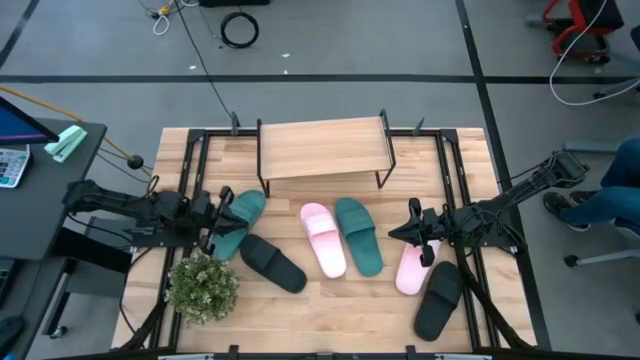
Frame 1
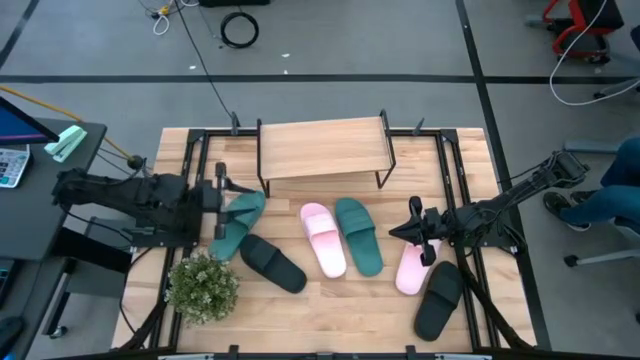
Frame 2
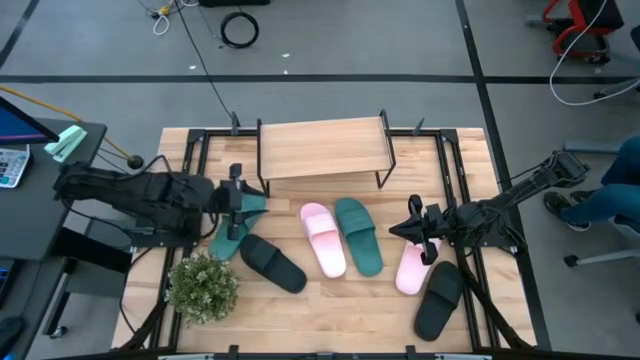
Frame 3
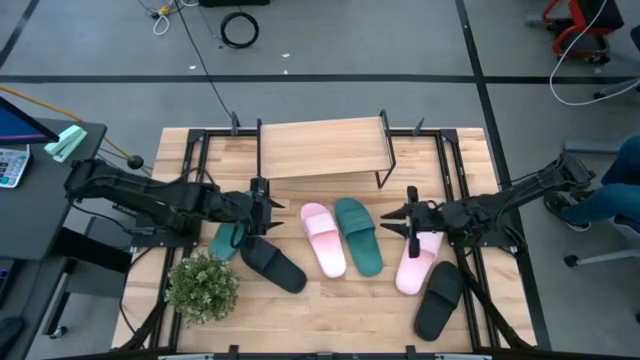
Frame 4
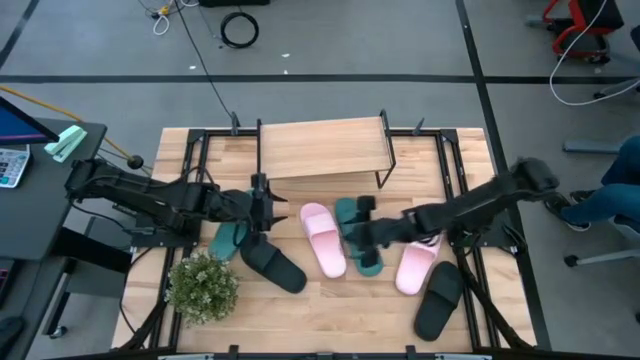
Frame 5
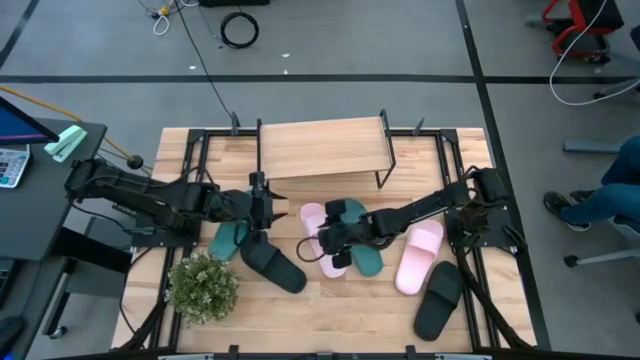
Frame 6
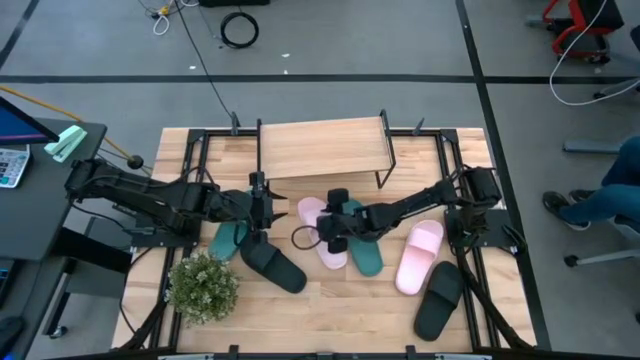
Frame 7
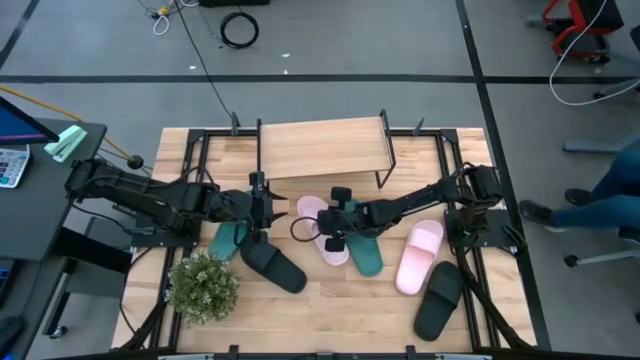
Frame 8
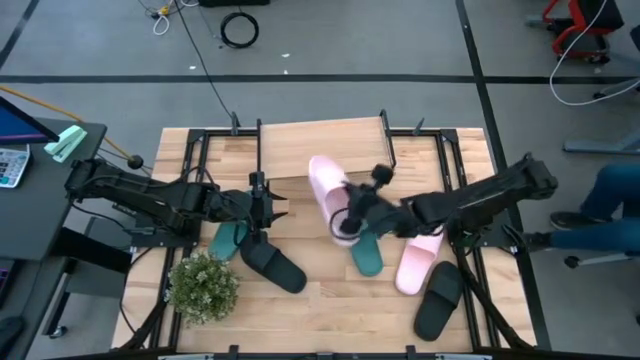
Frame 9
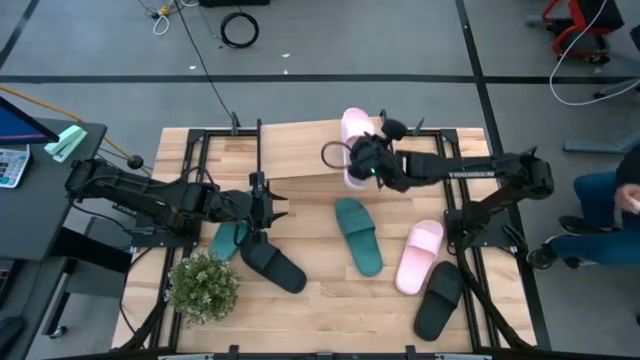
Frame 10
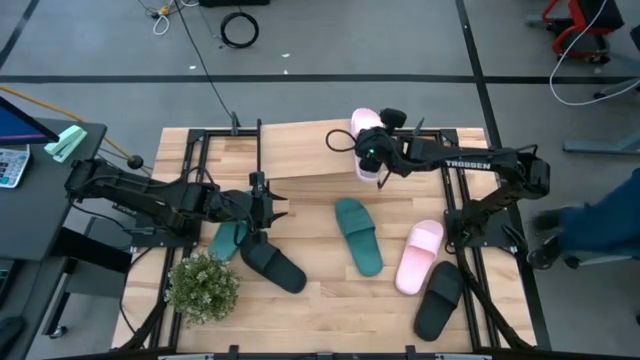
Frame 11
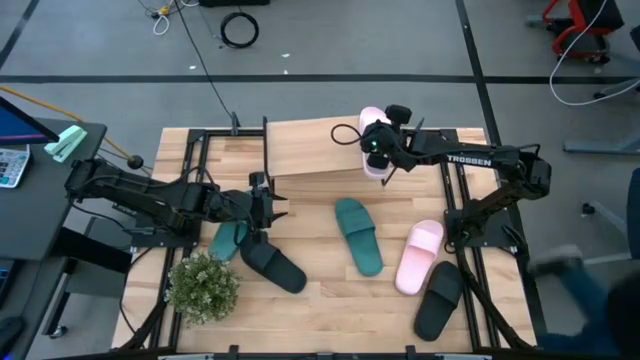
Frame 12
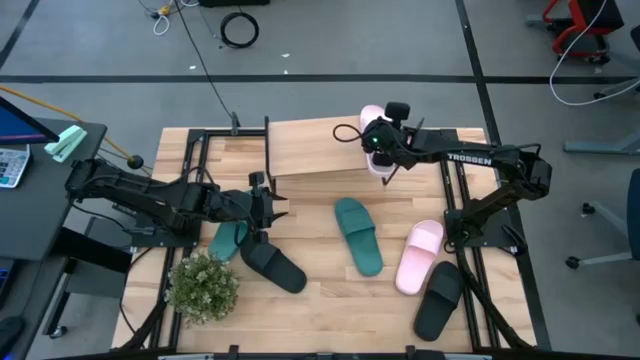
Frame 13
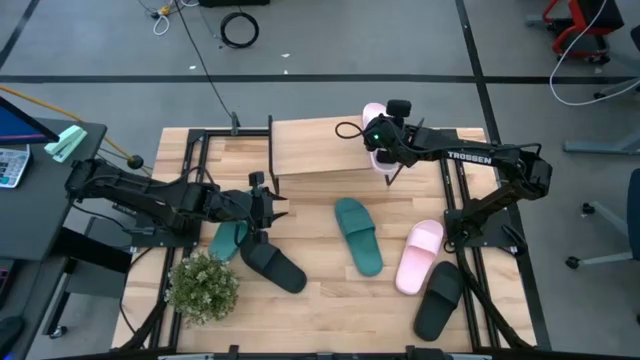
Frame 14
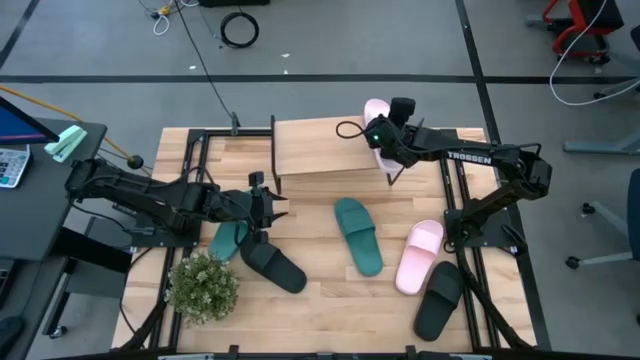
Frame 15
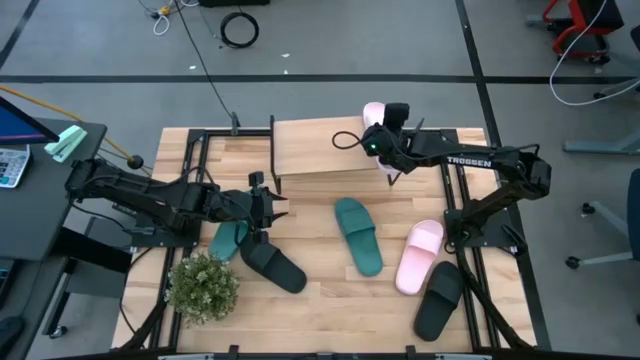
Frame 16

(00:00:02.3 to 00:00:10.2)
Task: Pick and place slides into the shelf
Put the left pink slipper on the shelf

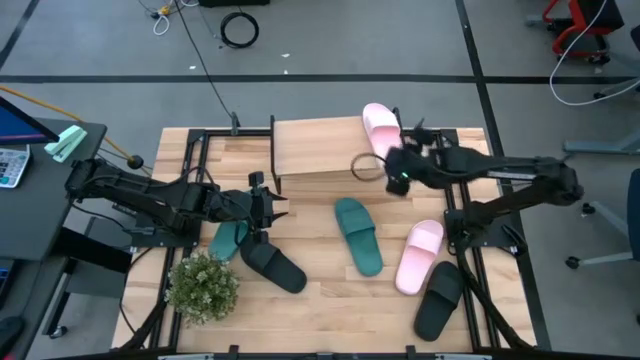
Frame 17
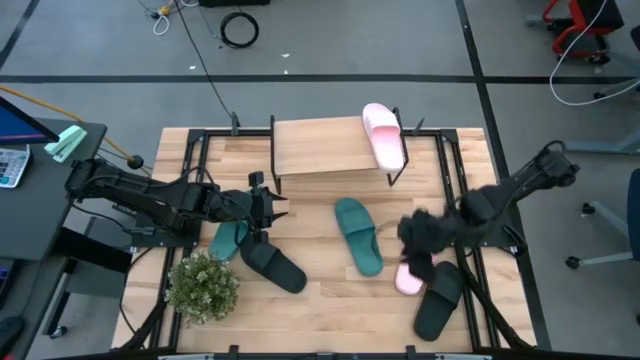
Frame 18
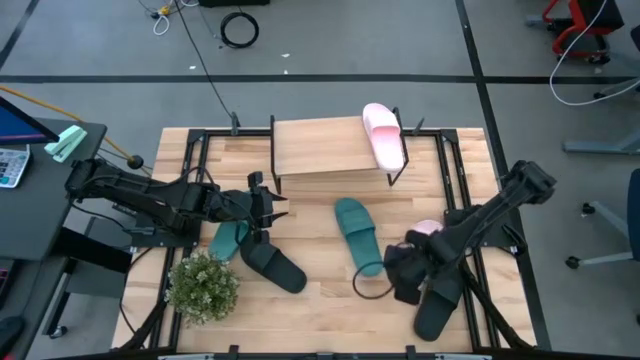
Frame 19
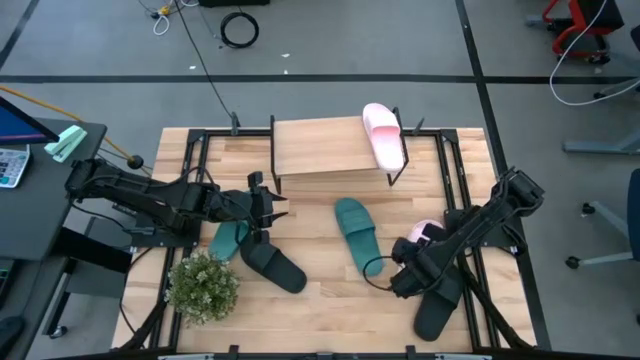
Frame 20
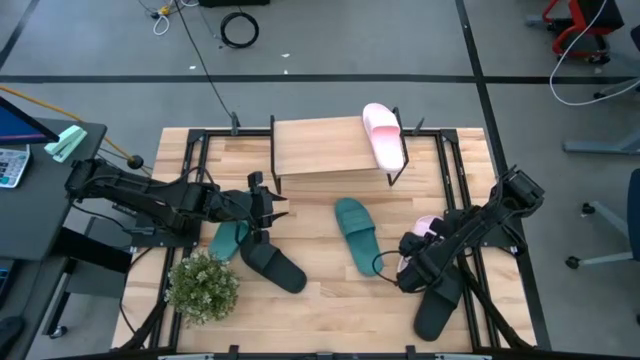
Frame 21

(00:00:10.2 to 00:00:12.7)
Put the pink slipper on the shelf

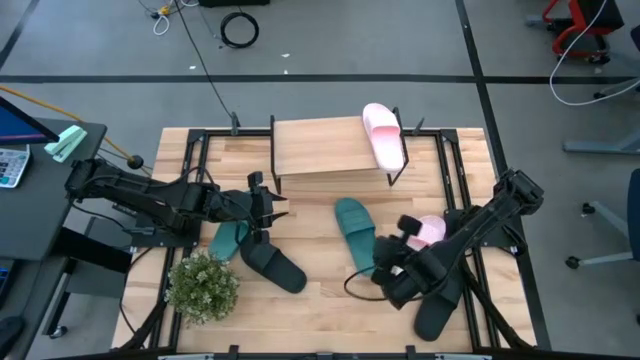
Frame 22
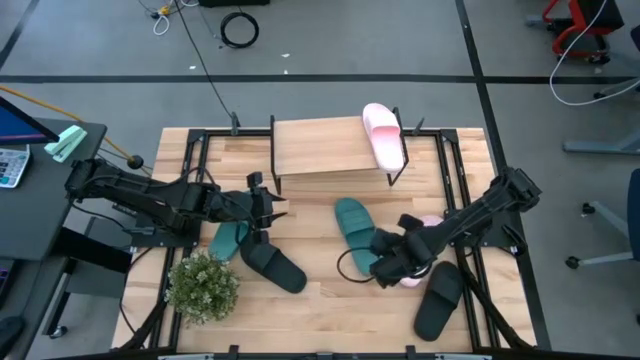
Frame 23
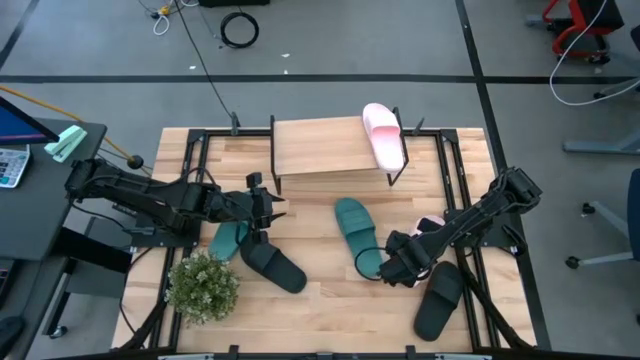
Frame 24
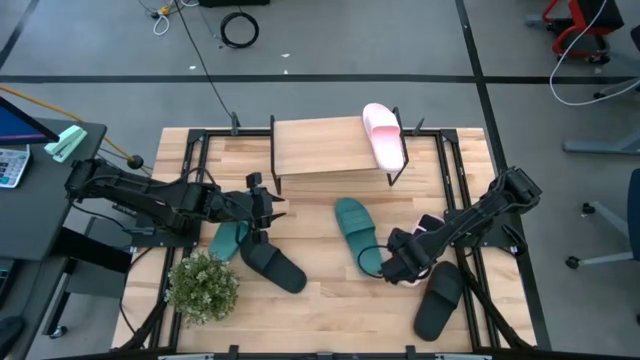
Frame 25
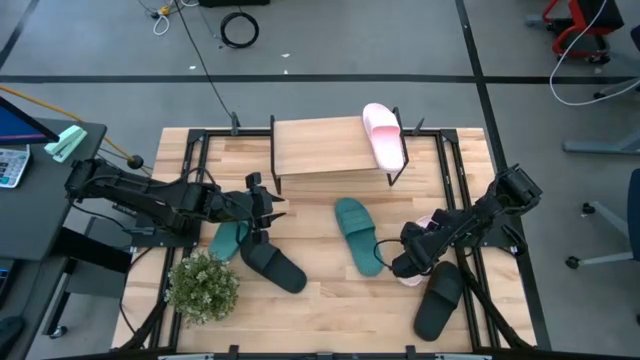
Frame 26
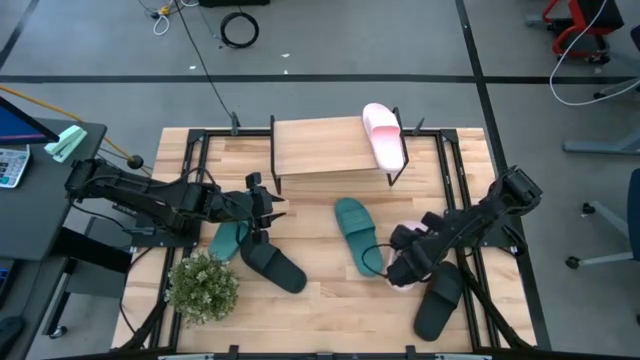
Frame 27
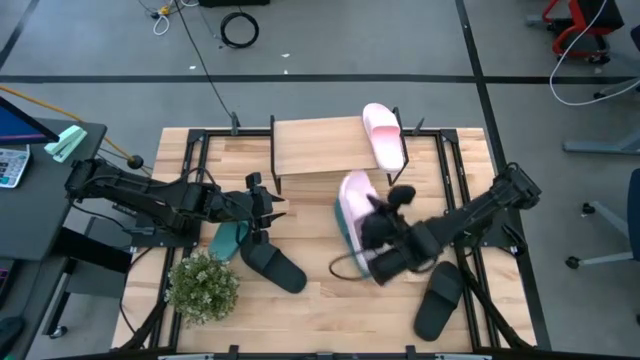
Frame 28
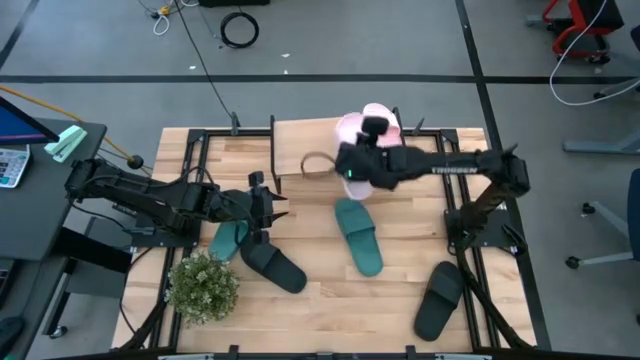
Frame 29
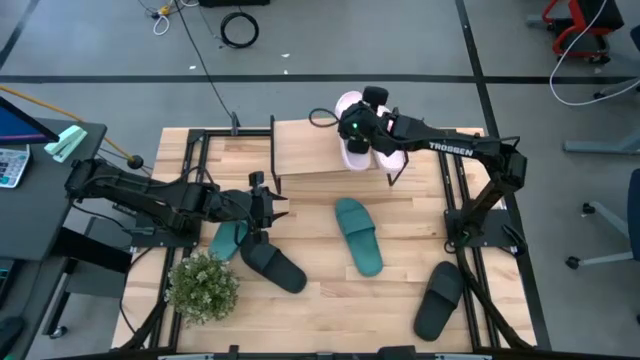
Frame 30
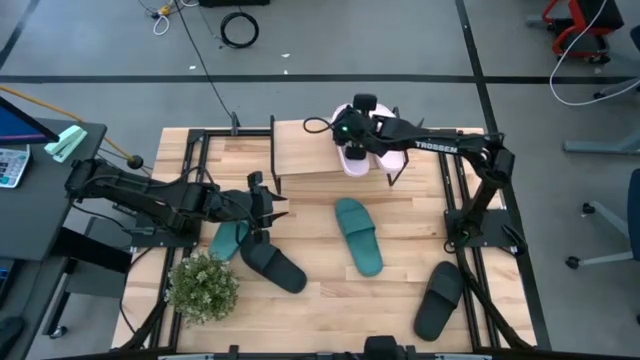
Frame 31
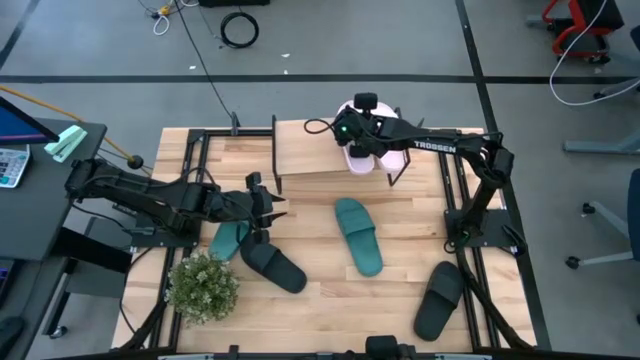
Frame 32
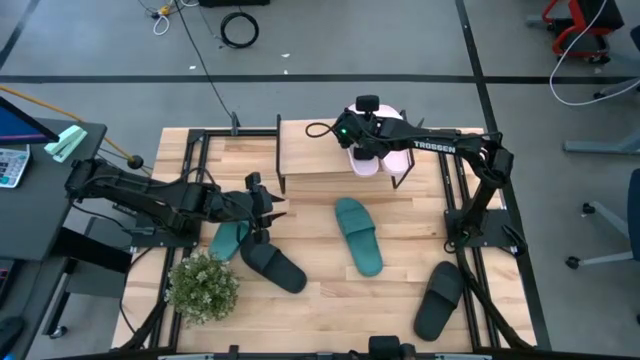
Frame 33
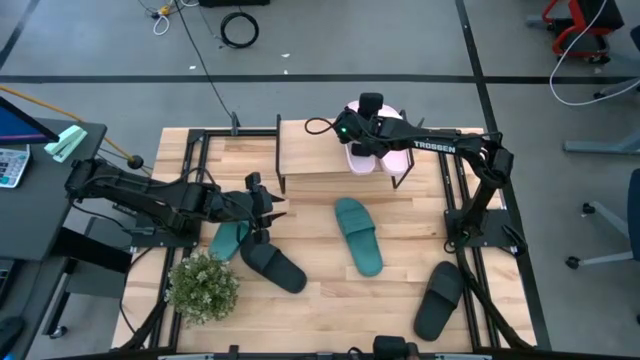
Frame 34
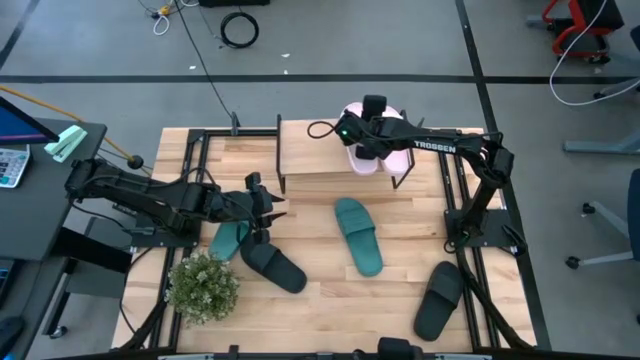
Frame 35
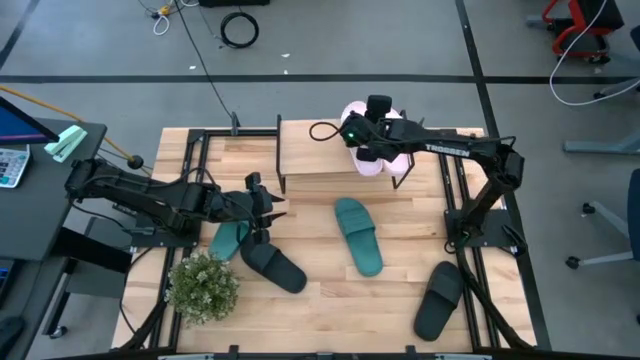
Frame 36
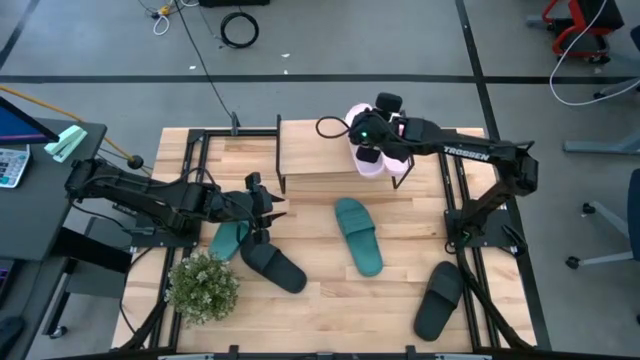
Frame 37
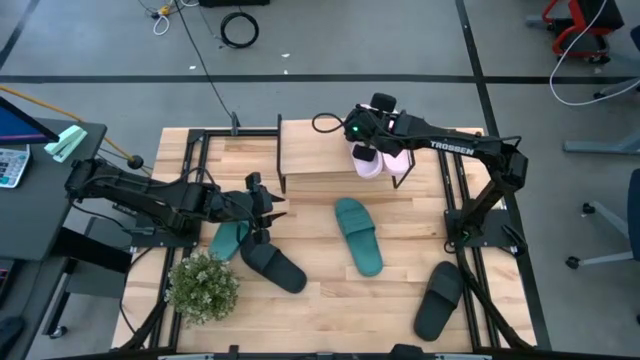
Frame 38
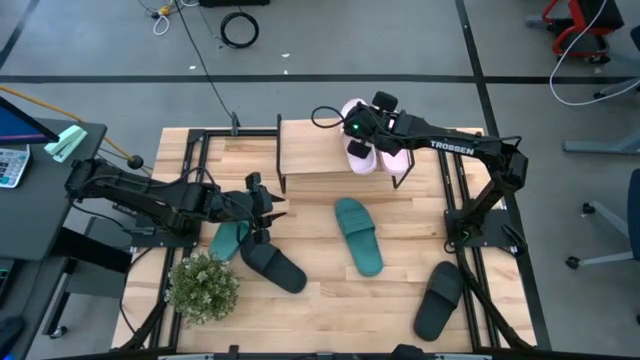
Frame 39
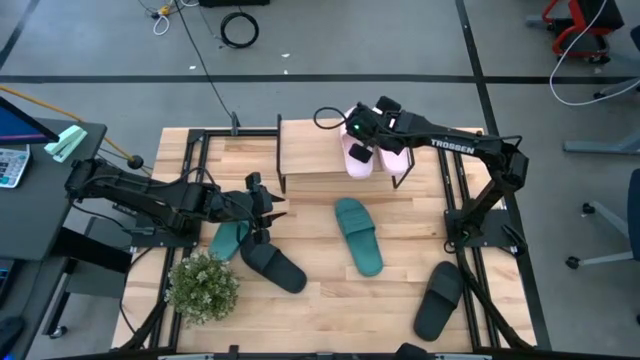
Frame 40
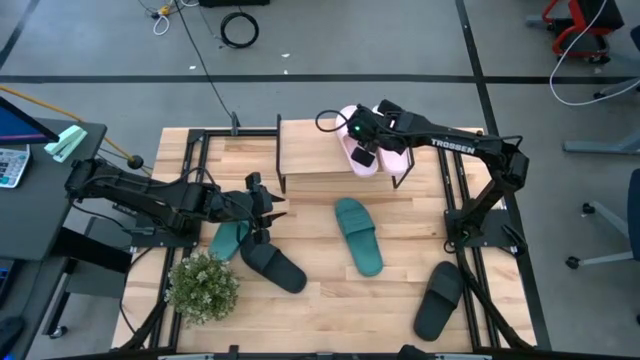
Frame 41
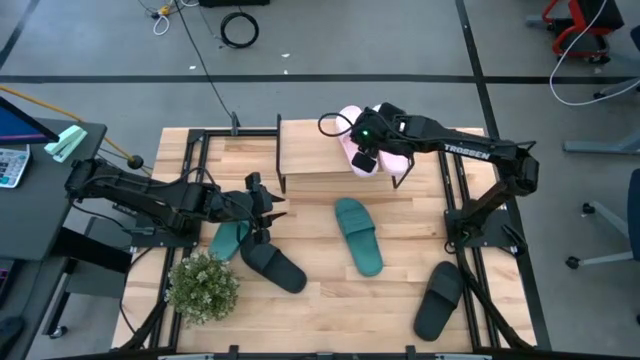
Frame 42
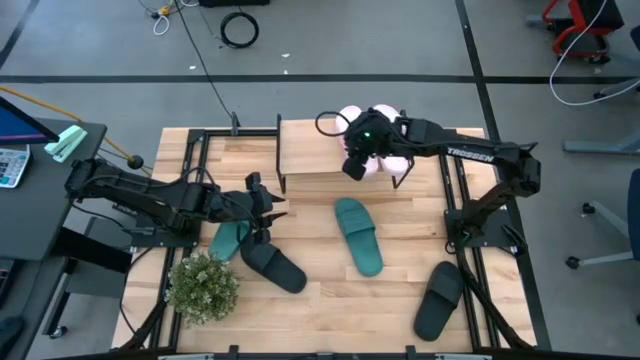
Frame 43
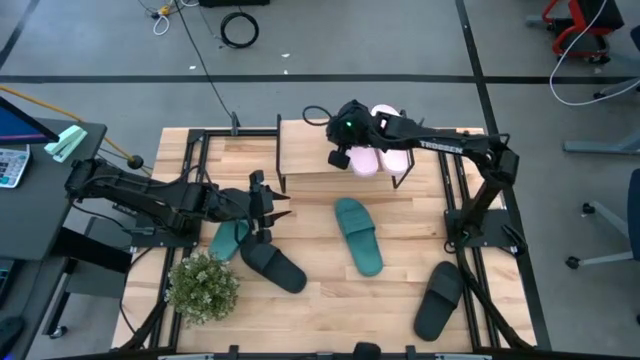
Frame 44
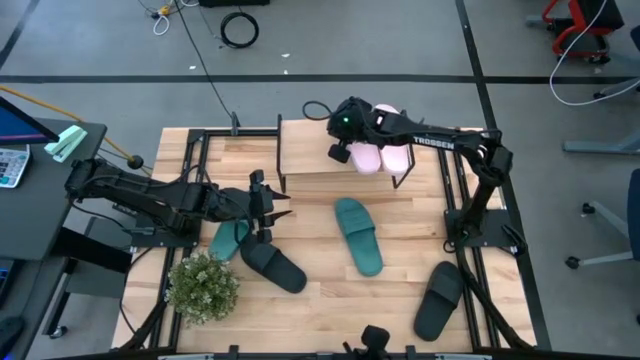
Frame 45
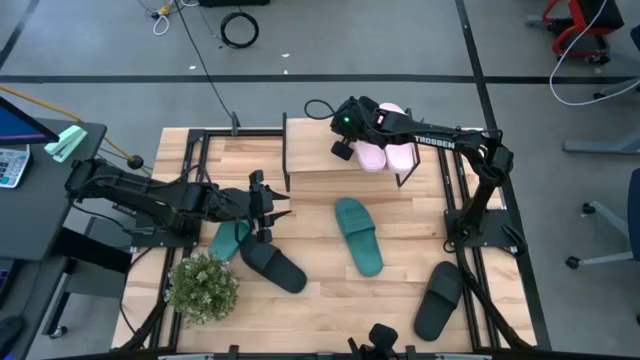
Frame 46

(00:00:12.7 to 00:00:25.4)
Put the pink slipper on the shelf
